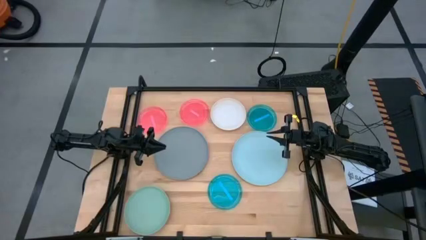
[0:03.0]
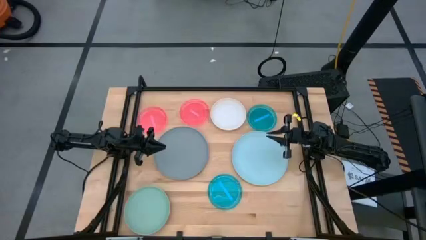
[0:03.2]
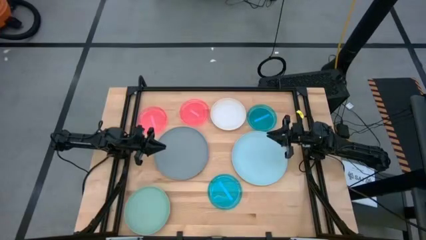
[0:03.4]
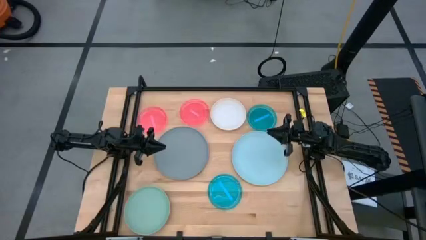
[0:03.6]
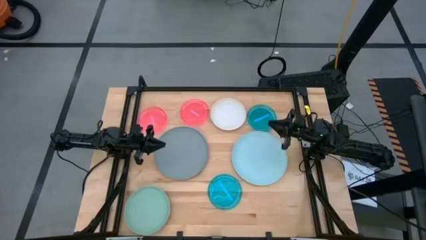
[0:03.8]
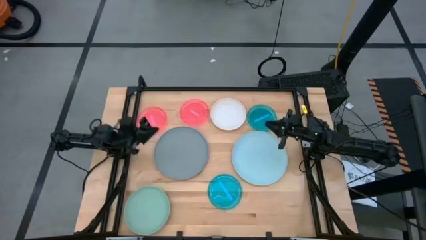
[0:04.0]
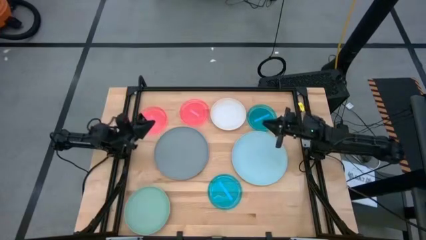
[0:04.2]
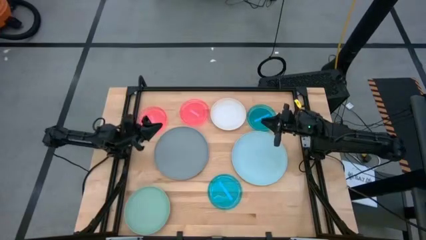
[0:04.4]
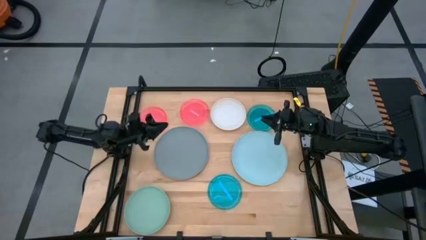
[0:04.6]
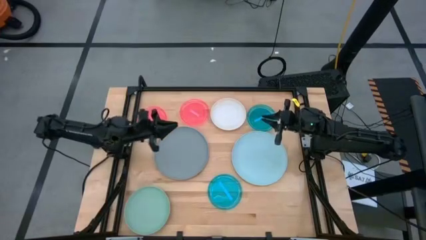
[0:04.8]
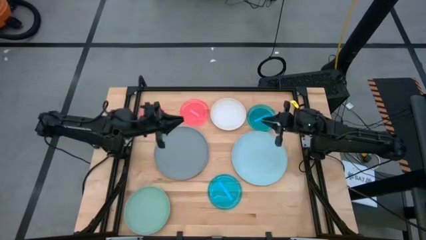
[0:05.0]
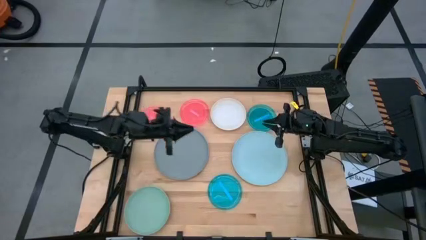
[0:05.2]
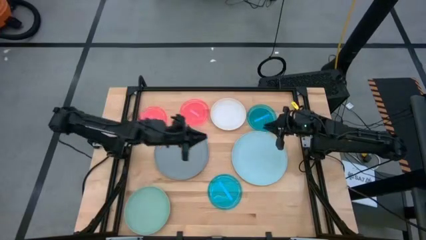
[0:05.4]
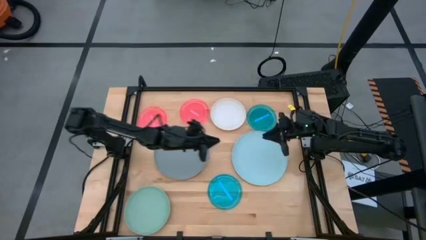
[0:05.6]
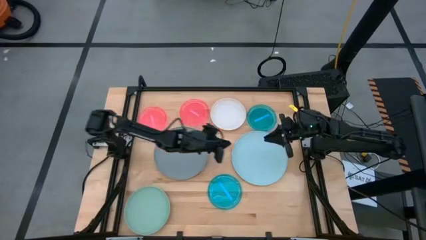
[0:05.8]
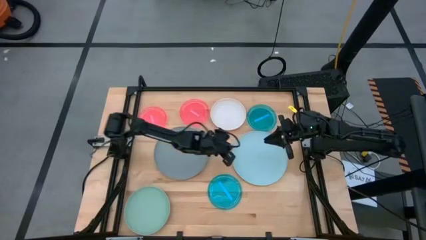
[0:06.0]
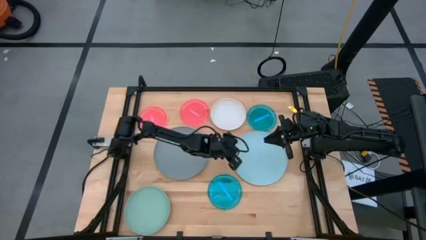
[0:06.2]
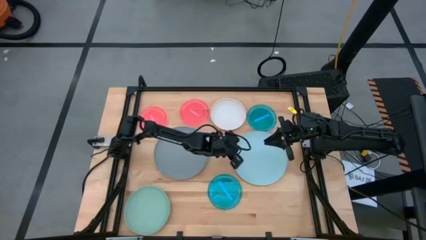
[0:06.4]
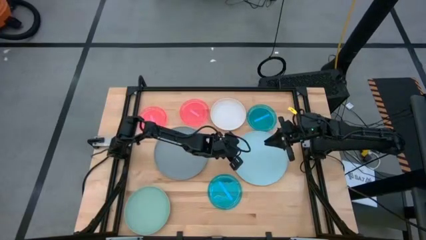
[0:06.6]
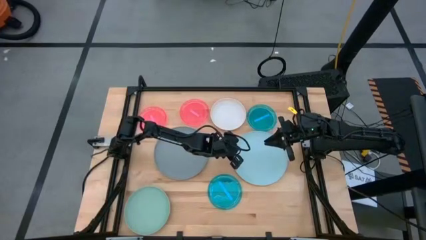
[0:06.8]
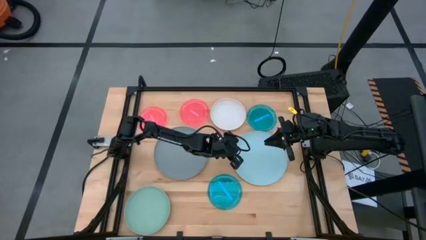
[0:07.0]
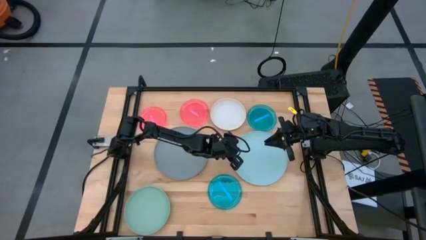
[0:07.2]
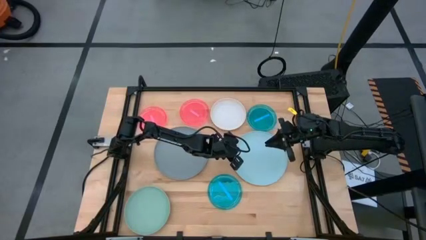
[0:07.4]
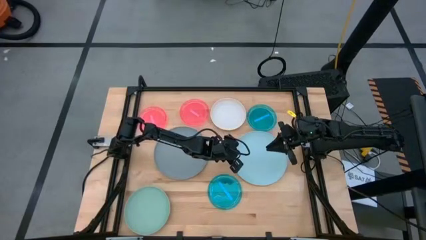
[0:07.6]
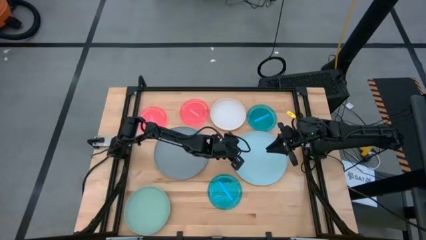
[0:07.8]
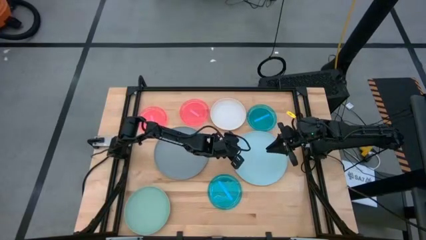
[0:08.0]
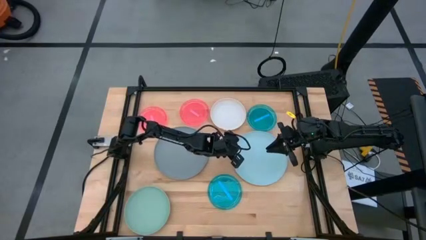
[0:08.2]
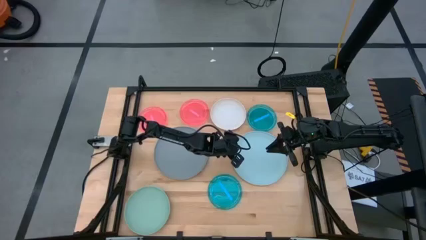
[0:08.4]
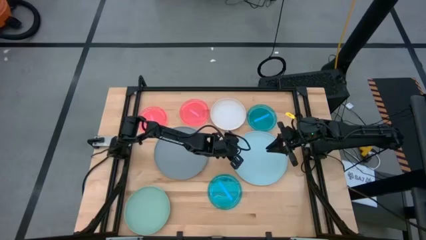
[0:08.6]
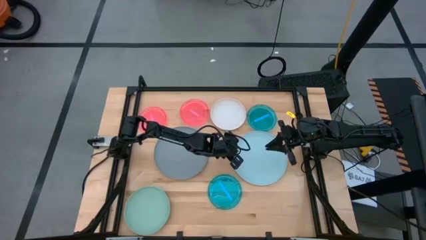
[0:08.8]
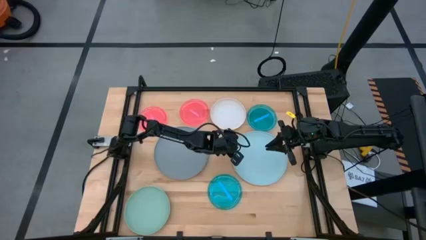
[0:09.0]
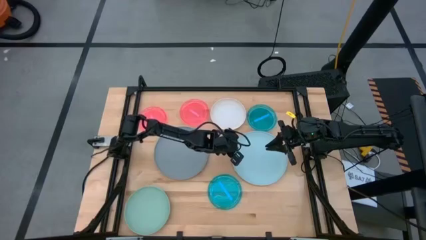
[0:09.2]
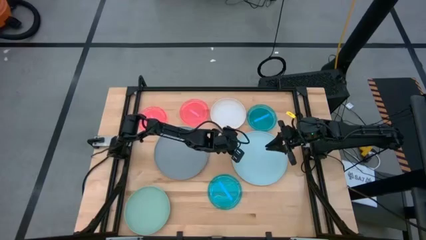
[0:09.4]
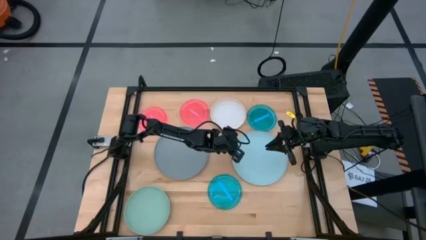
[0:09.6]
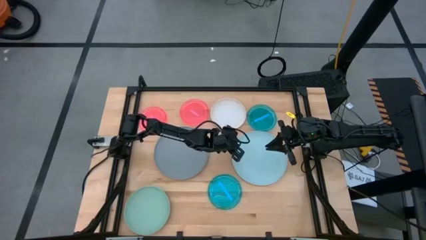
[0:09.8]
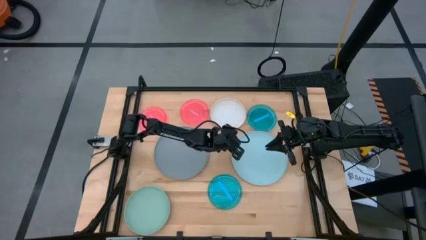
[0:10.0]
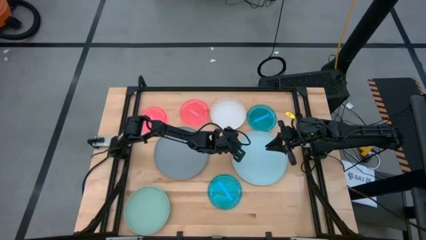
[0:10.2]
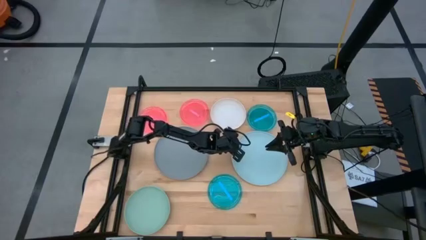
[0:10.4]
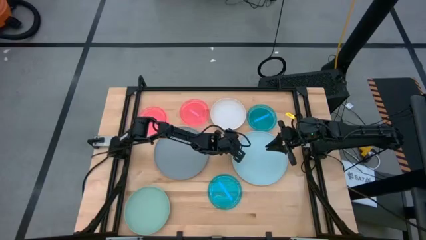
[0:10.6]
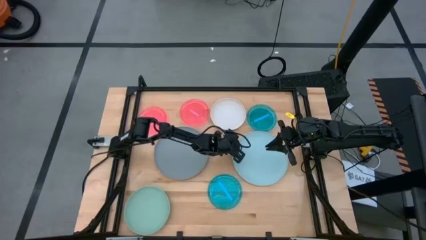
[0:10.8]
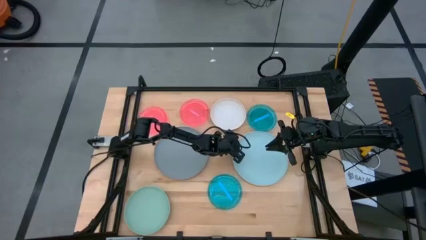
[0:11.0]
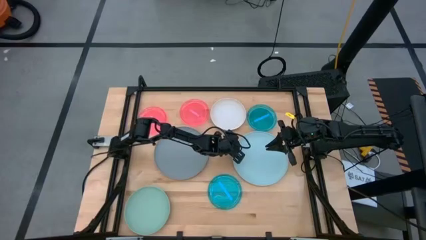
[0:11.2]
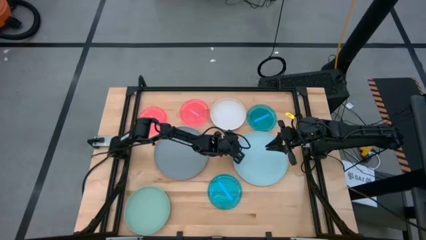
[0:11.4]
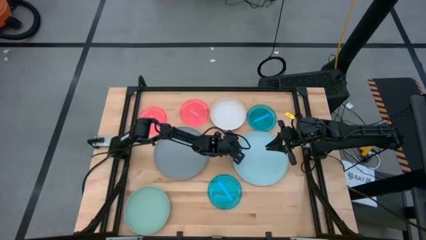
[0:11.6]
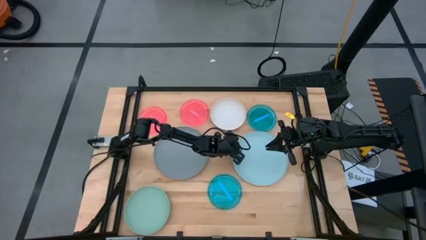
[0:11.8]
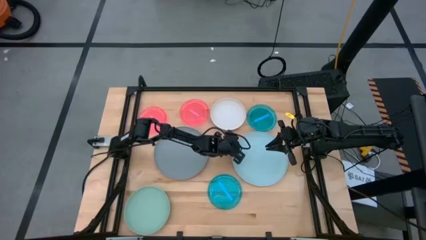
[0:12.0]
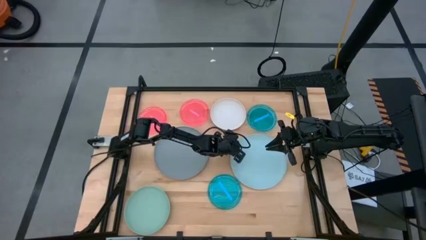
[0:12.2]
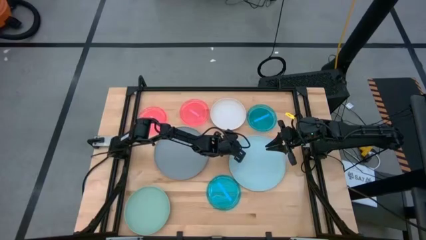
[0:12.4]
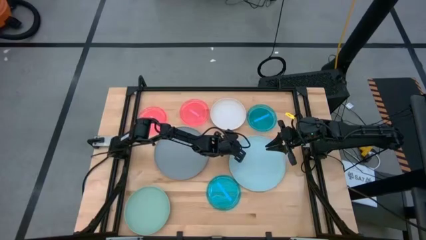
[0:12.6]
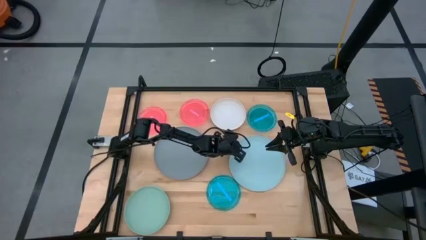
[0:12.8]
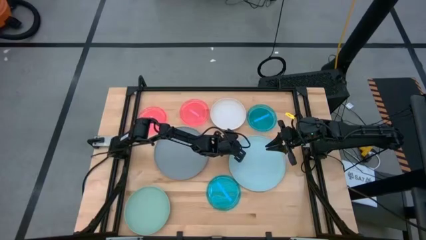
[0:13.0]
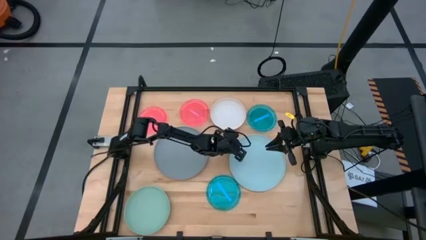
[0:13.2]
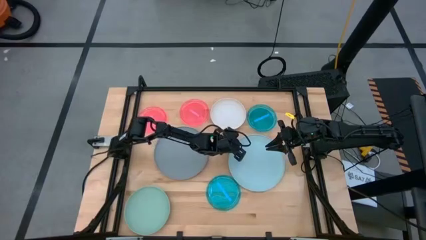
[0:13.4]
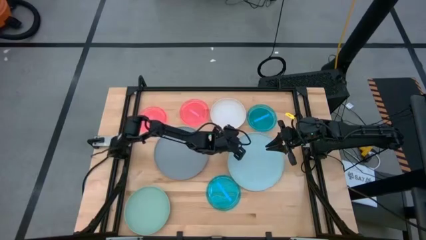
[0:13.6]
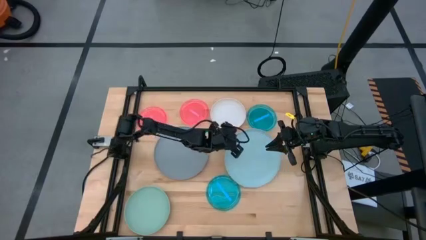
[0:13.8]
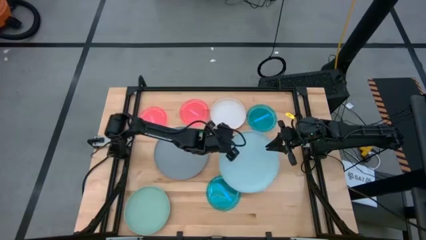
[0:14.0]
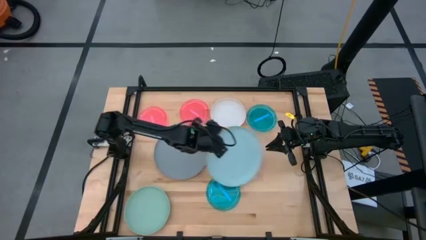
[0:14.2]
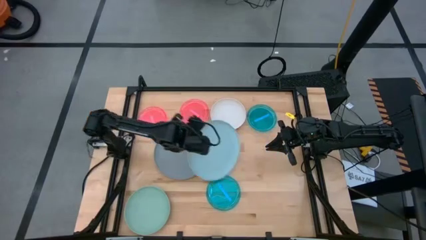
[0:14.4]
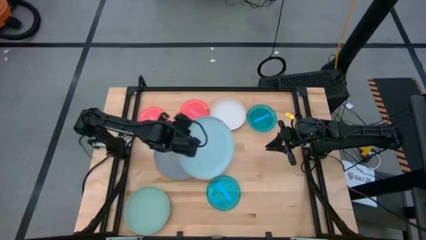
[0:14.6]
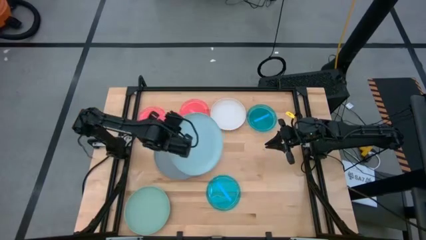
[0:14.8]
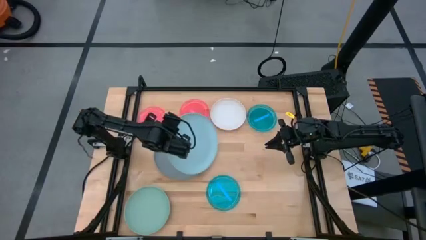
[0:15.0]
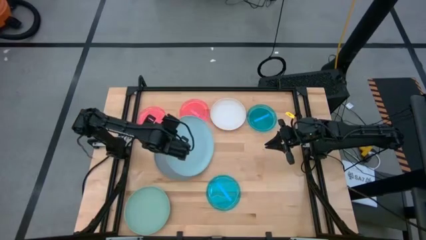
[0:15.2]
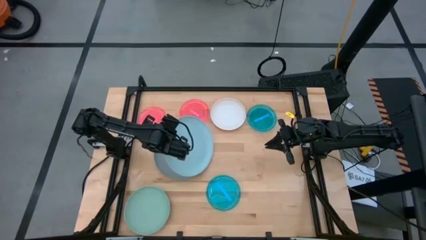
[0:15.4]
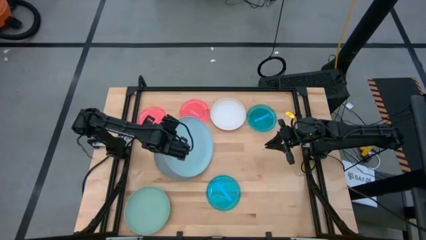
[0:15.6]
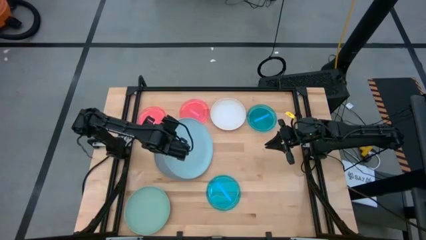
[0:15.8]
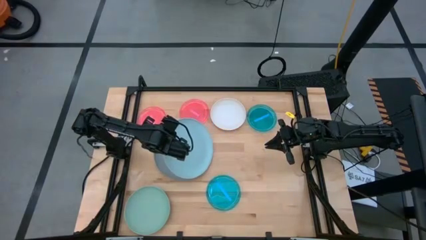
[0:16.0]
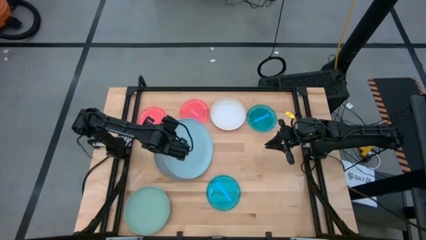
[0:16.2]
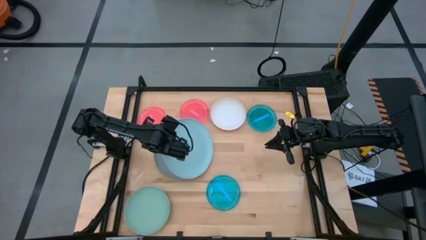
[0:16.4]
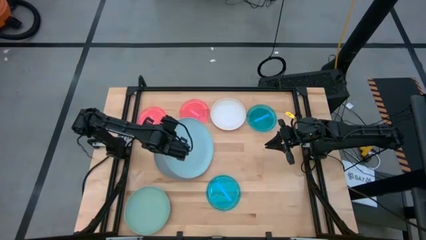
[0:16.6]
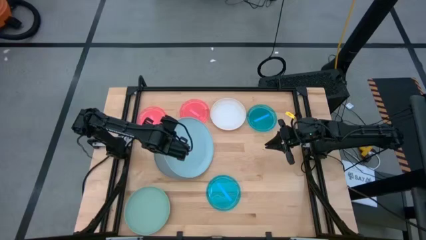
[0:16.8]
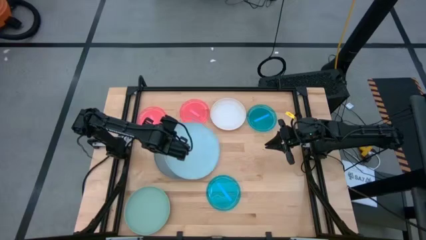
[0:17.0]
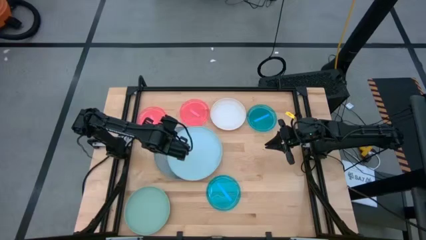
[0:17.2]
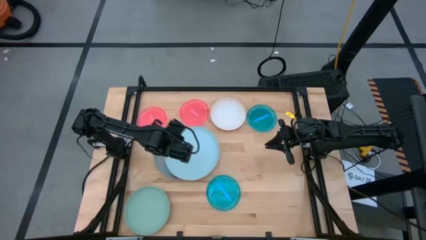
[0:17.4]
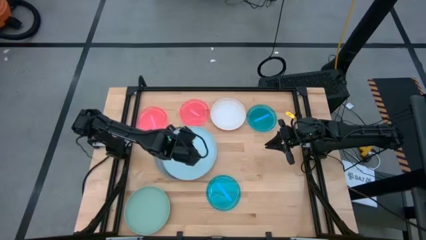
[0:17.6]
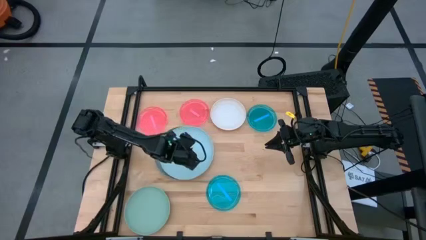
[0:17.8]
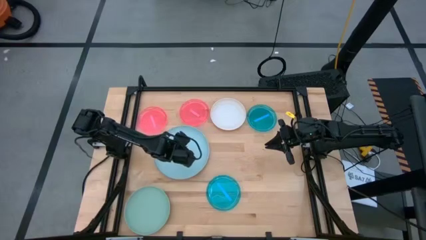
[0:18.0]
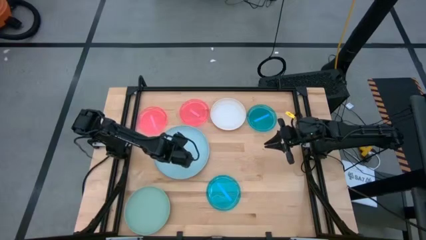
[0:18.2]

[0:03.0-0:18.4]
Task: Stack plastic plates
Stack the light blue plate on top of the gray plate
